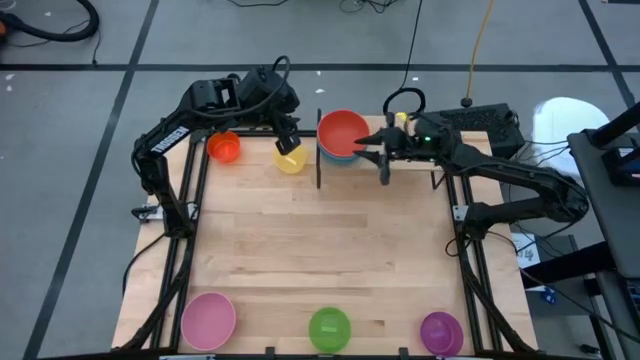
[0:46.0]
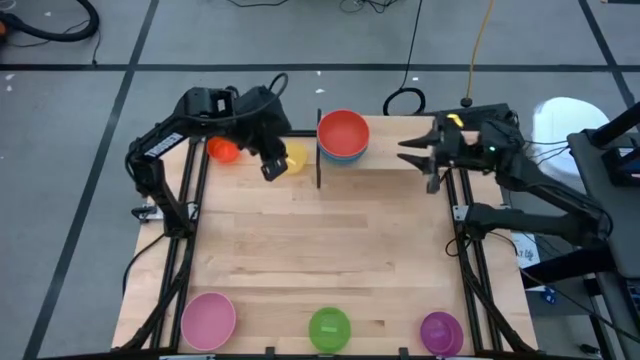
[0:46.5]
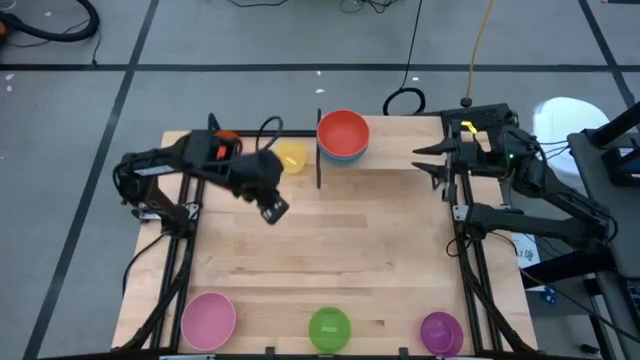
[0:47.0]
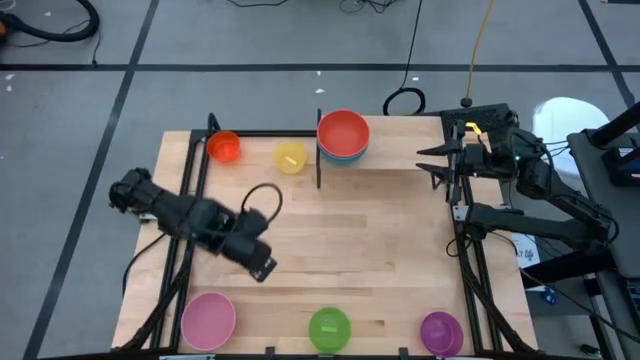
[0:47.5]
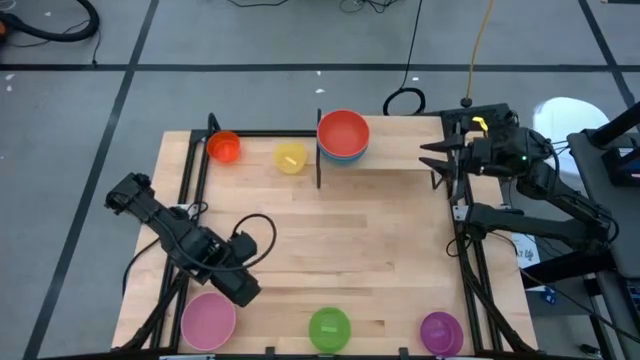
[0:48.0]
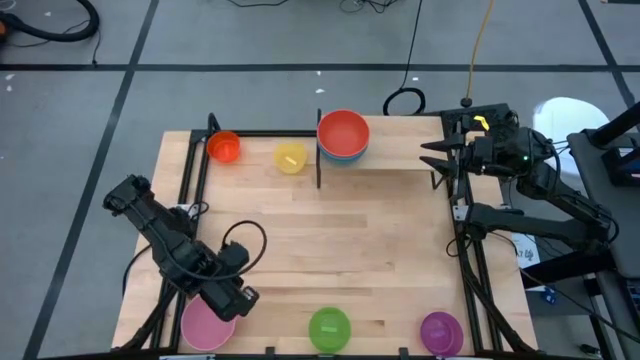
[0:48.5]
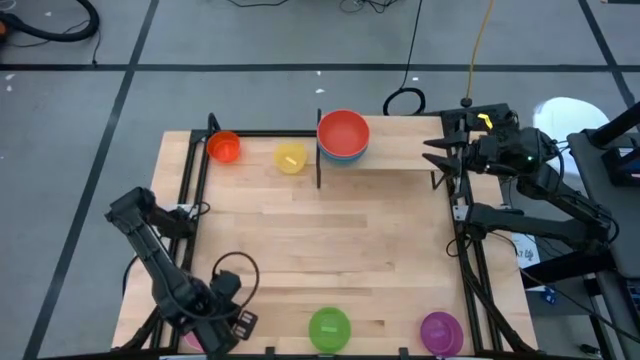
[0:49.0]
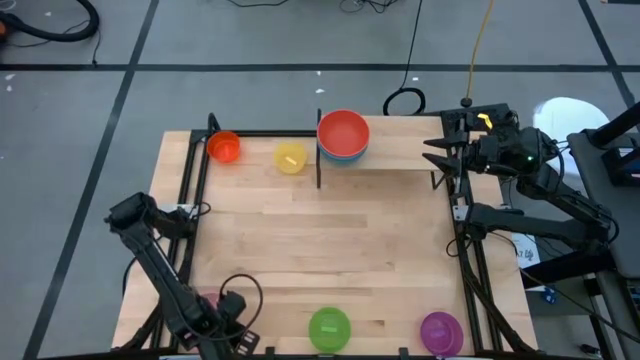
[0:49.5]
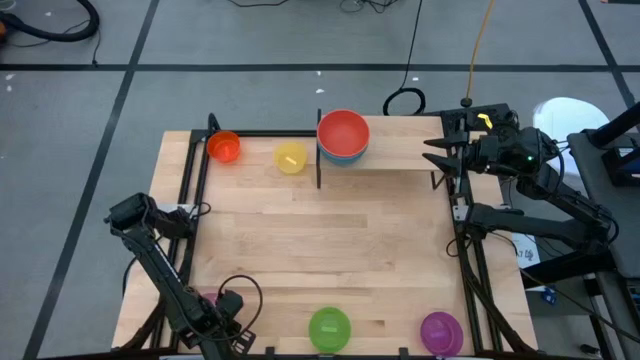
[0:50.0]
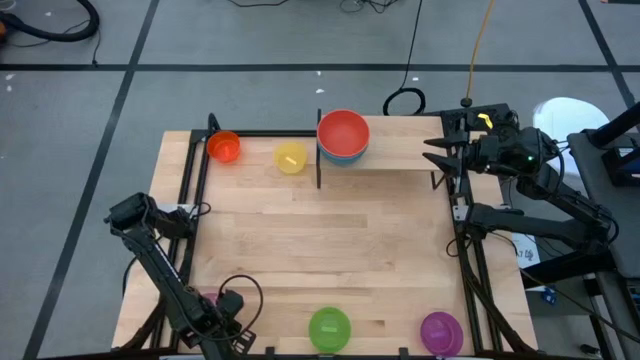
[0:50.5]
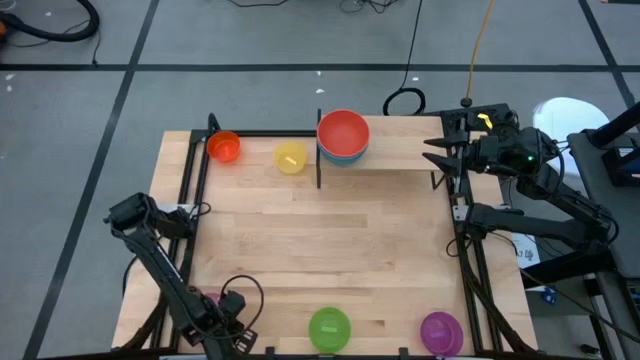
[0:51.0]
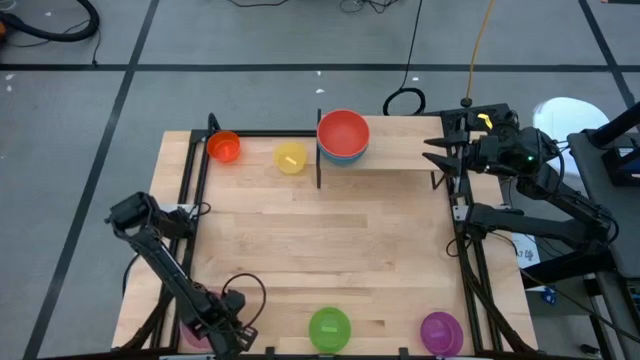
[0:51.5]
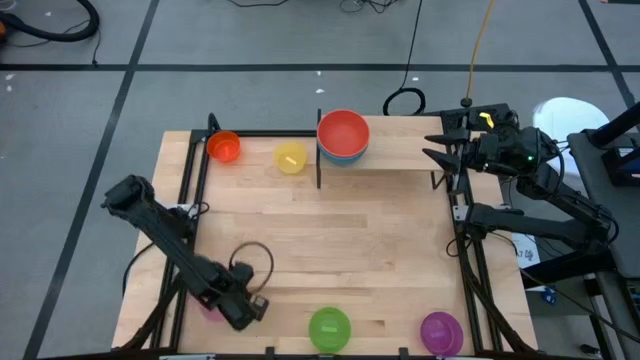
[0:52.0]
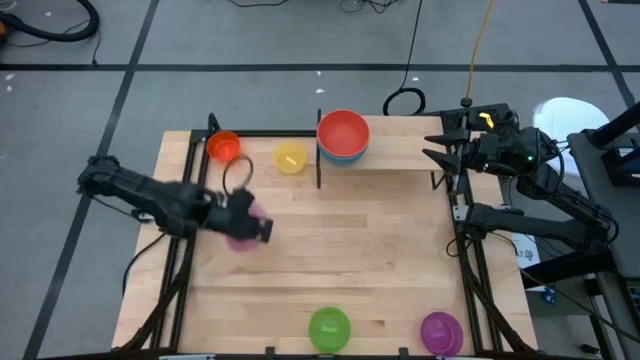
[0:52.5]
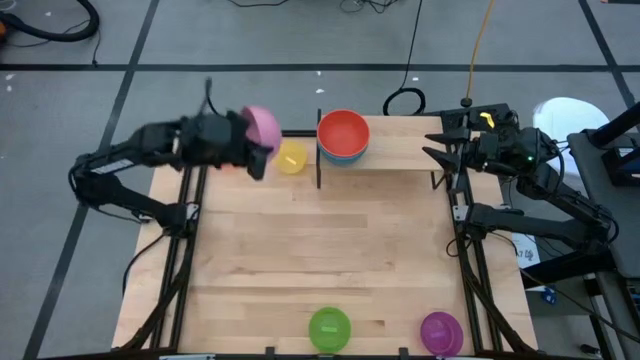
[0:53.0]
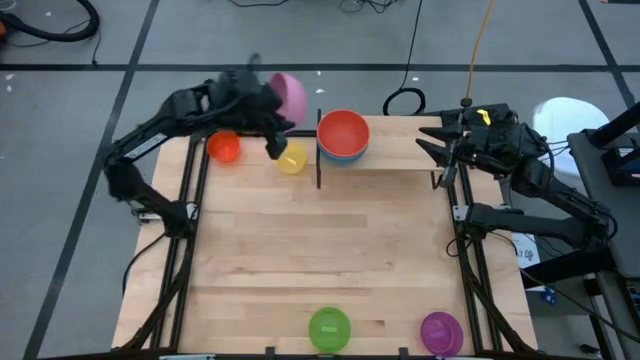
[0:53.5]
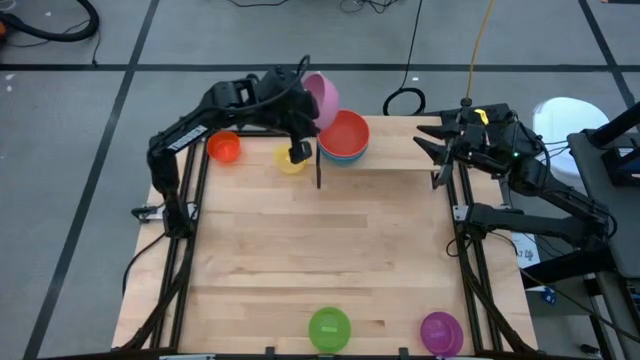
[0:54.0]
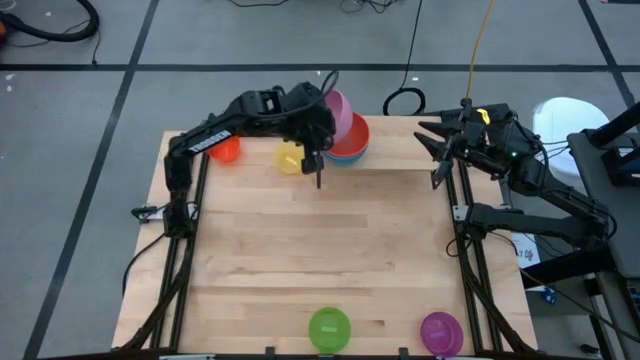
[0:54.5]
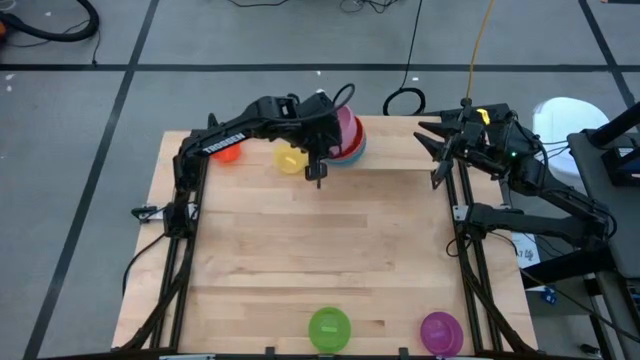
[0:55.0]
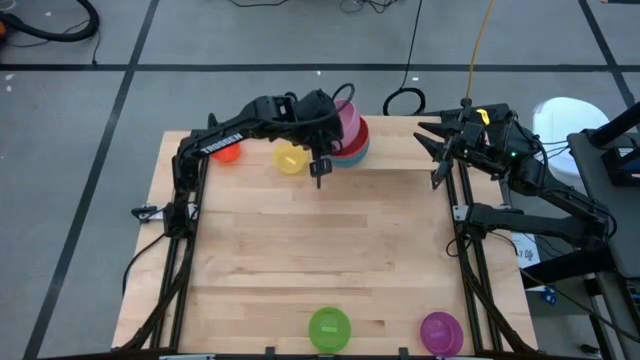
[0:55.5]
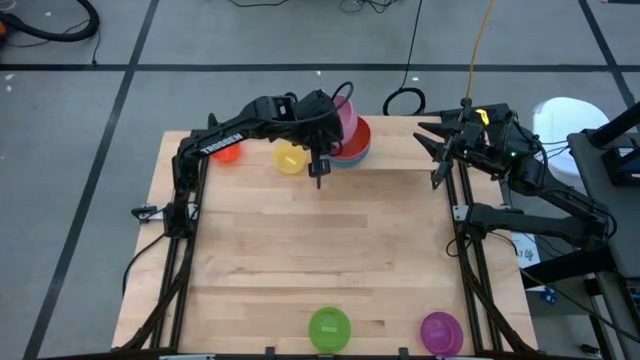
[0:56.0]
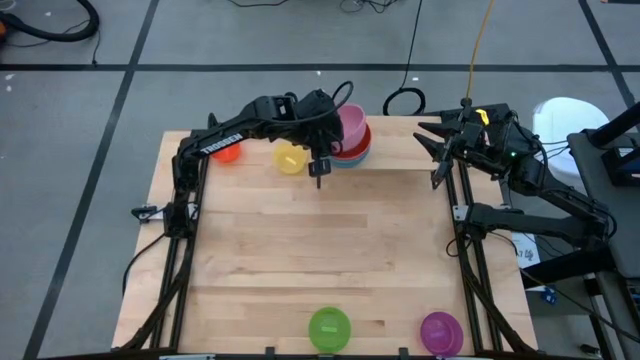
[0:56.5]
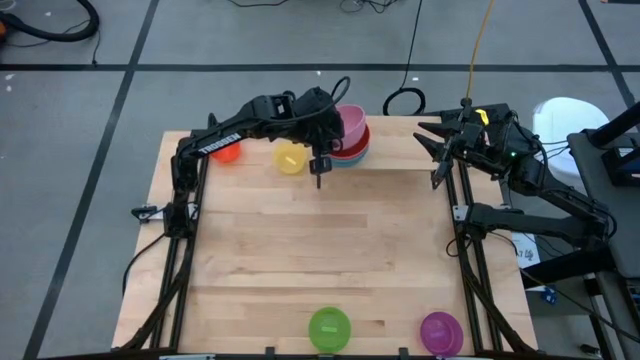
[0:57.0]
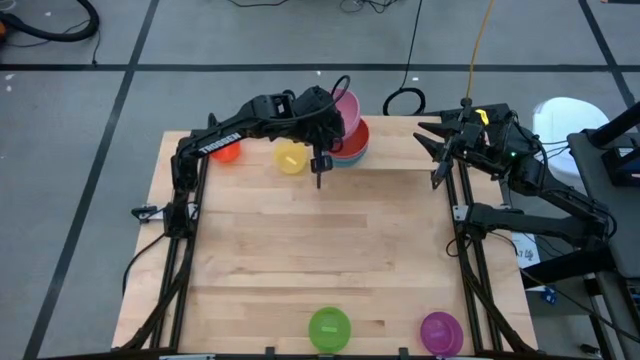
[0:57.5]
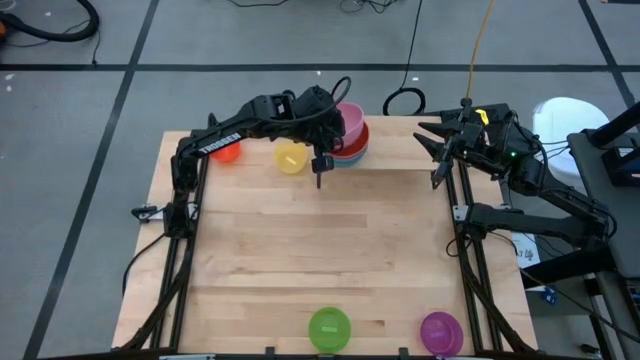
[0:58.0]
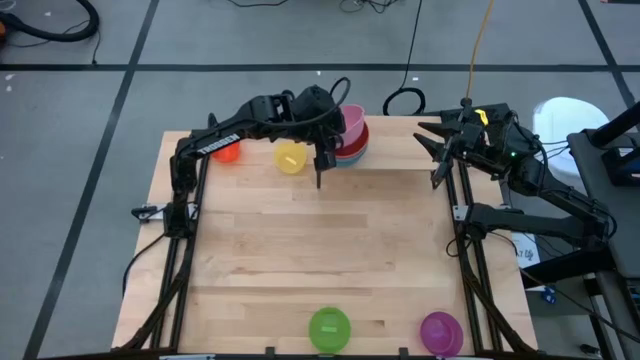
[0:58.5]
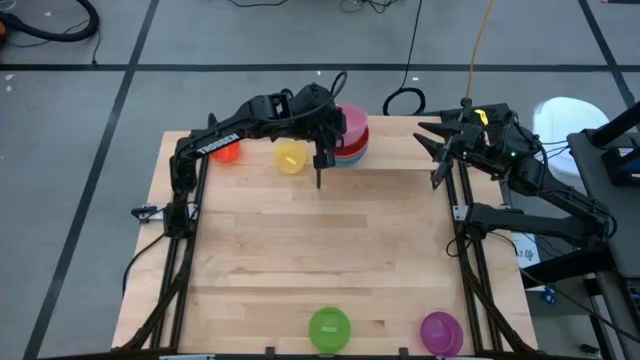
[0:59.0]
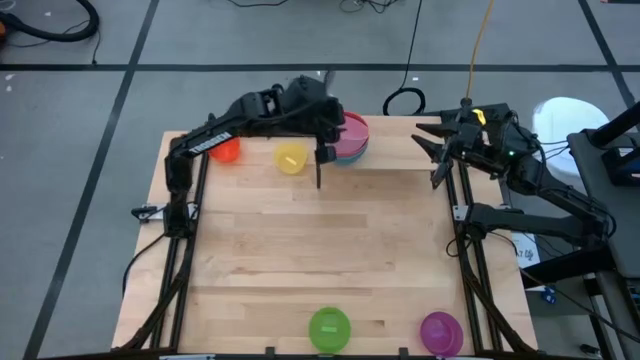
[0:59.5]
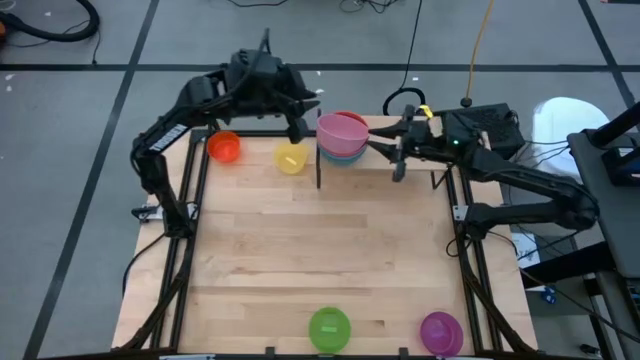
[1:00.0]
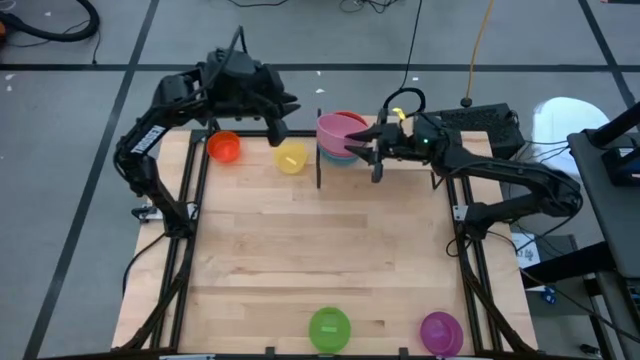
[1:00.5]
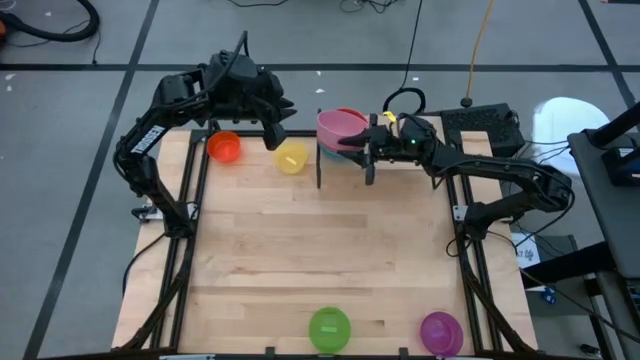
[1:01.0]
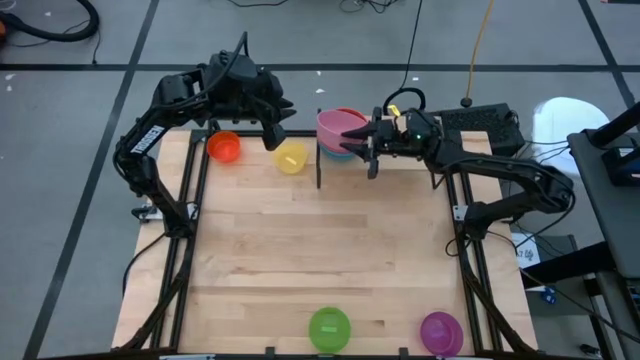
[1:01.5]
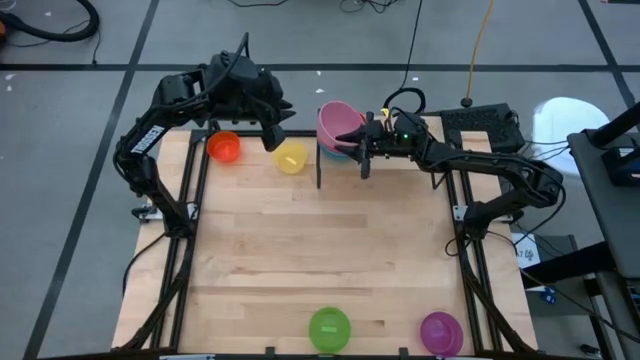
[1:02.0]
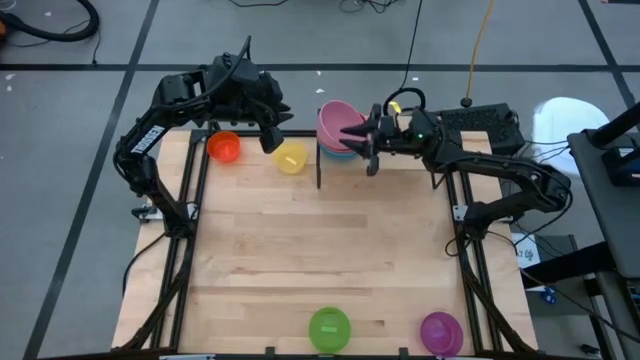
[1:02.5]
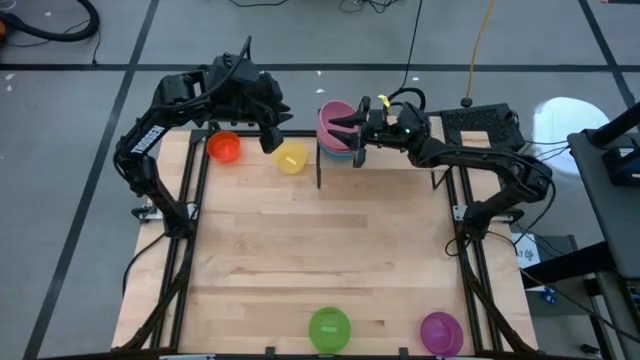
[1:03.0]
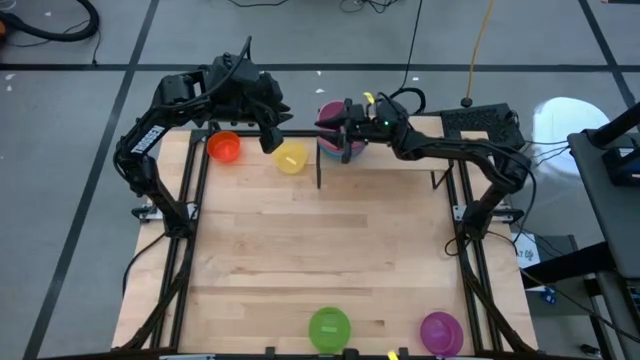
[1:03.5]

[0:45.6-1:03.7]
Task: Place and stack bowls onto a shelf
Stack the pink bowl on top of the orange bowl on the shelf

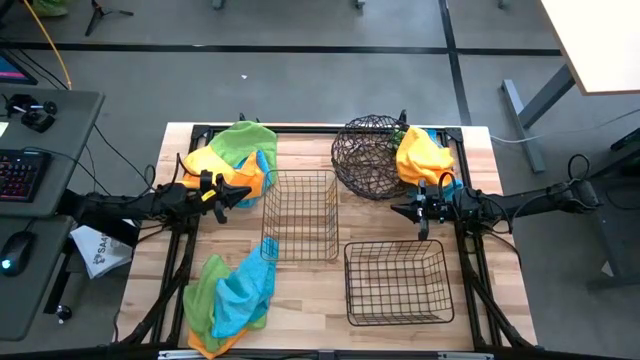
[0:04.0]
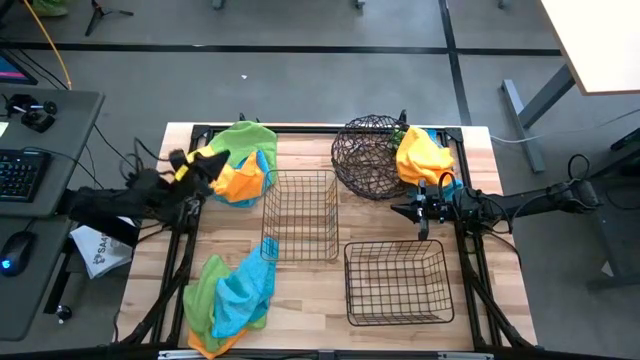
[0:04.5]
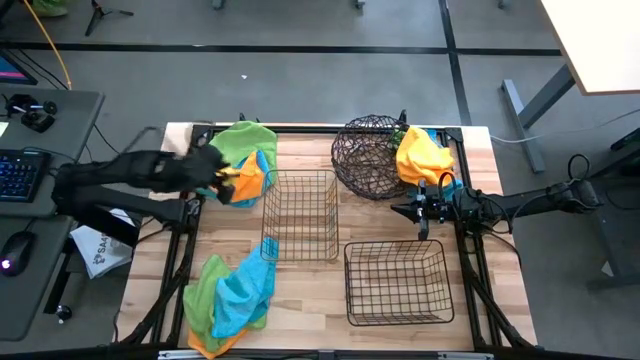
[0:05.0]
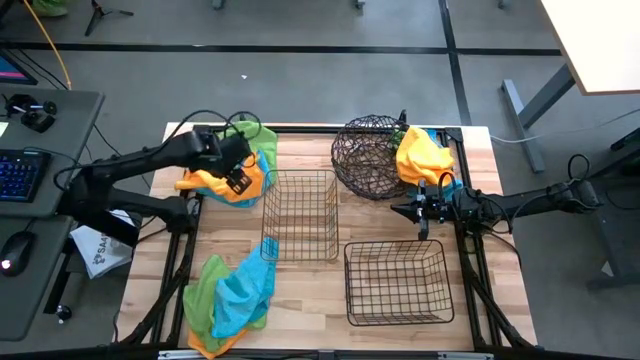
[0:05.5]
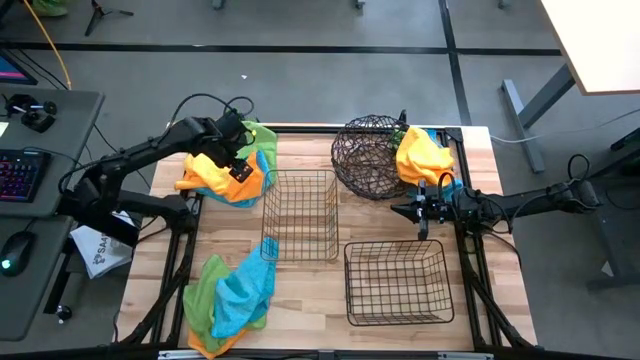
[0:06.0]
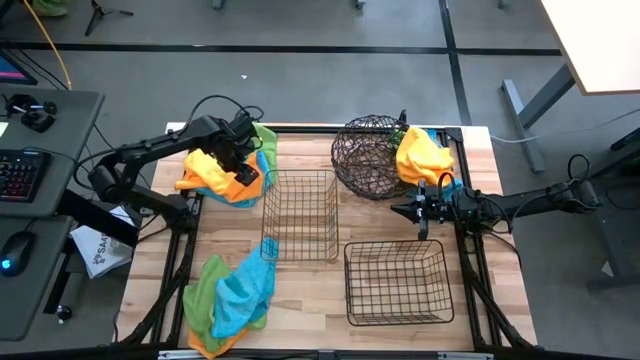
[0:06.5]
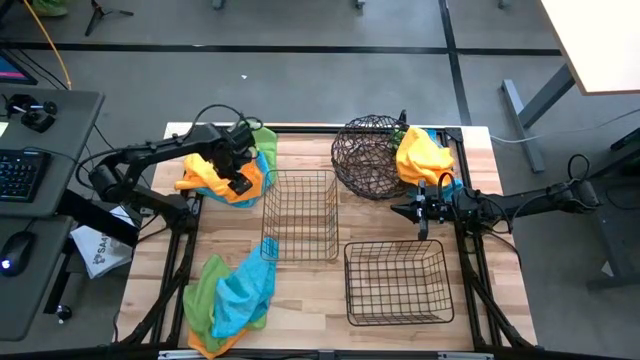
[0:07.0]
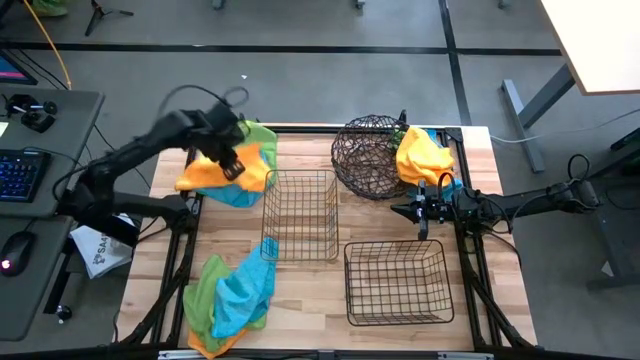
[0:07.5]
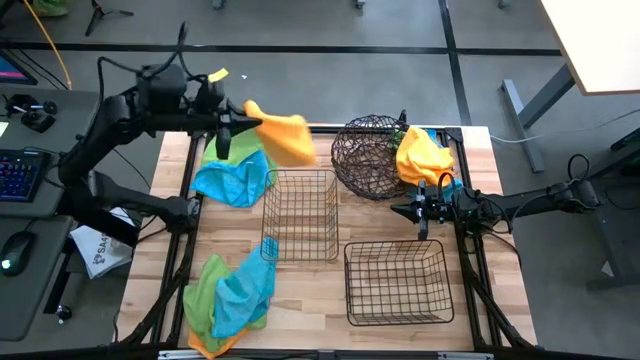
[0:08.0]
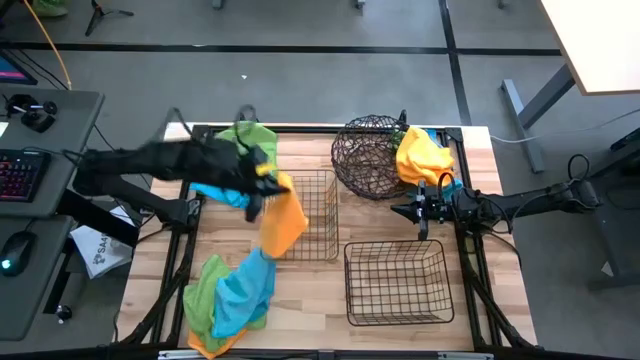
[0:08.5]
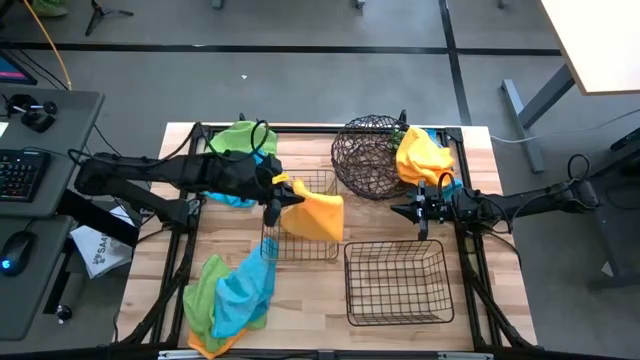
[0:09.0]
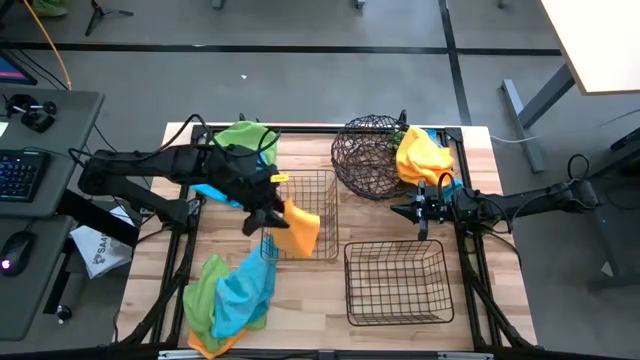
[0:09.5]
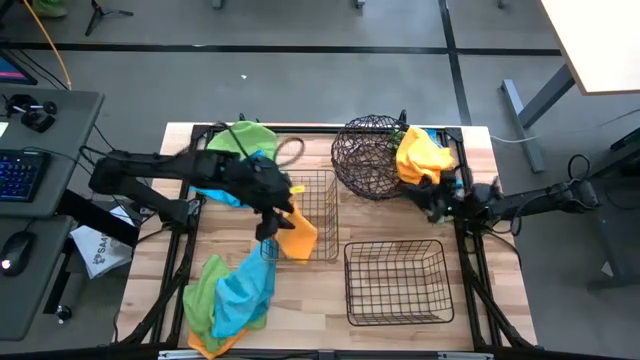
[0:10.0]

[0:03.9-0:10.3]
Task: Sort microfiber towel by color & place in baskets
Put the top left yellow microfiber towel into the center black metal basket
